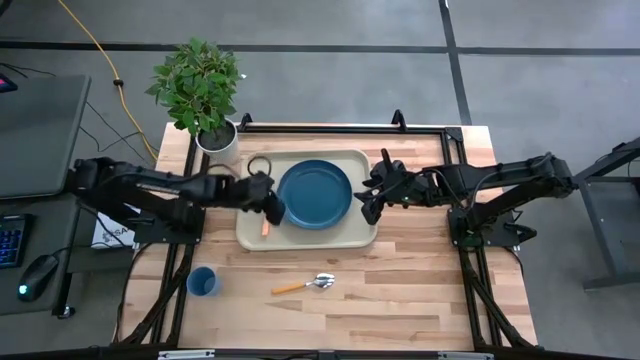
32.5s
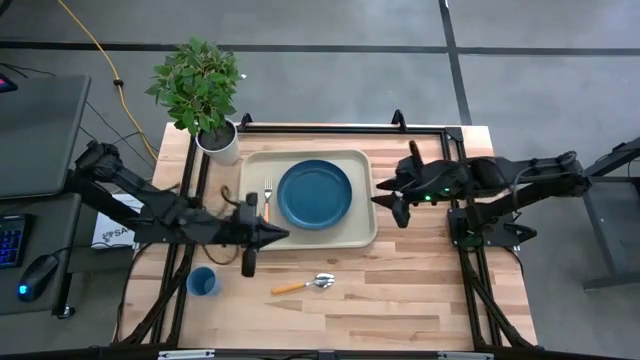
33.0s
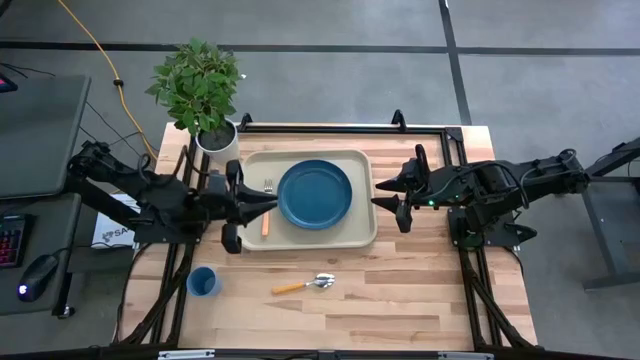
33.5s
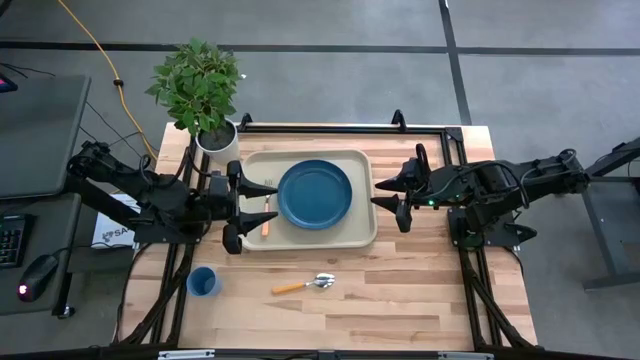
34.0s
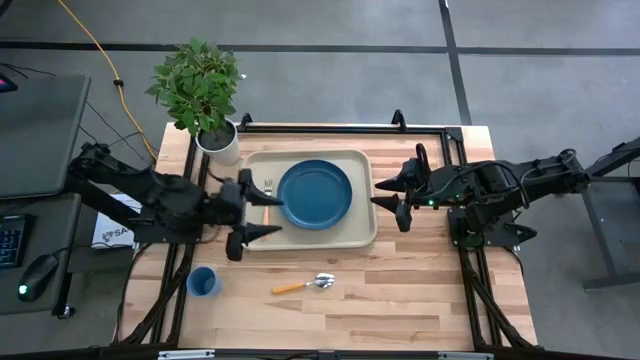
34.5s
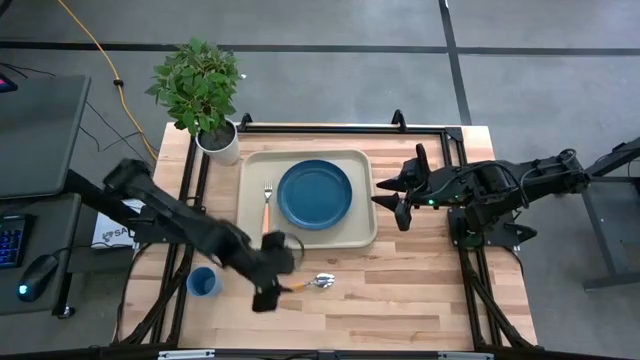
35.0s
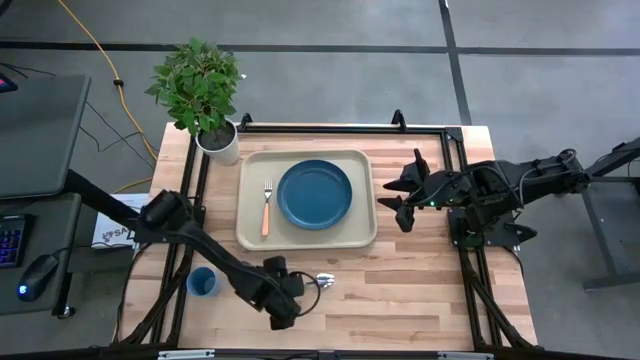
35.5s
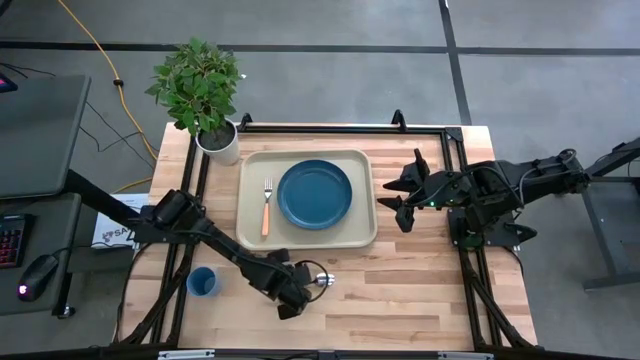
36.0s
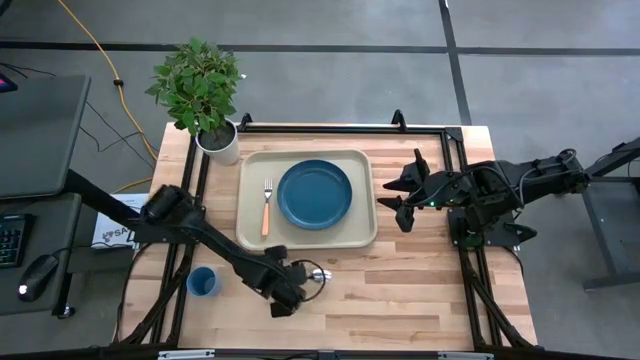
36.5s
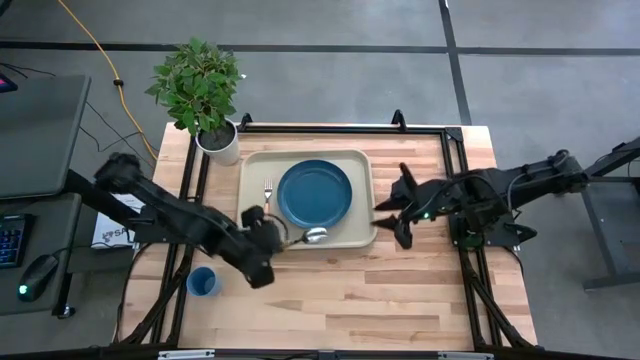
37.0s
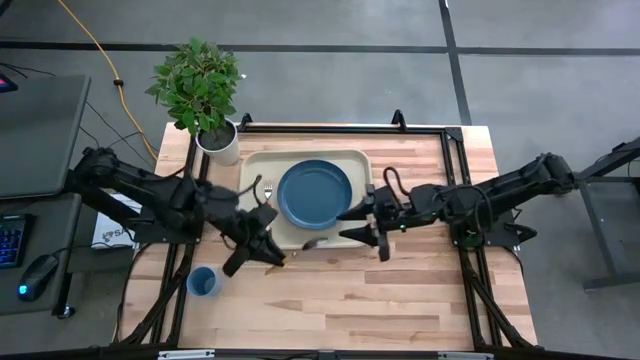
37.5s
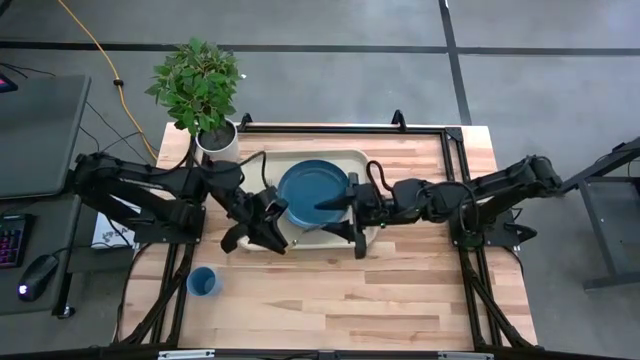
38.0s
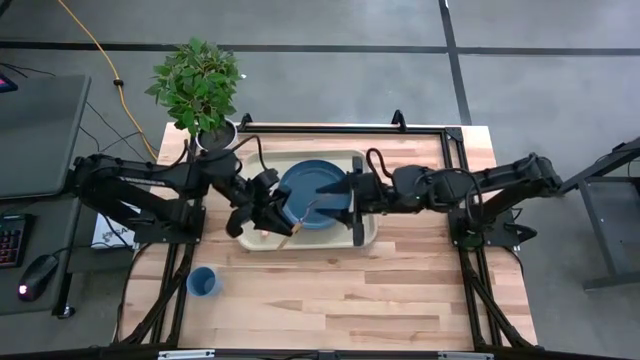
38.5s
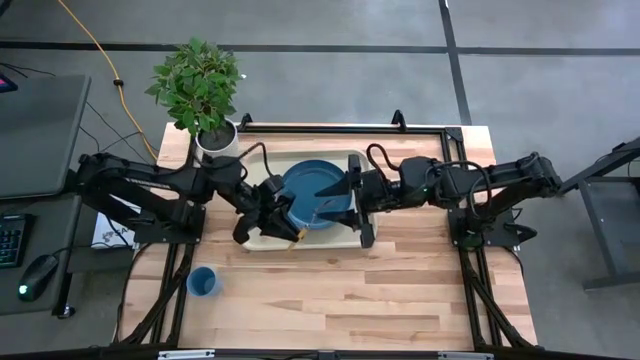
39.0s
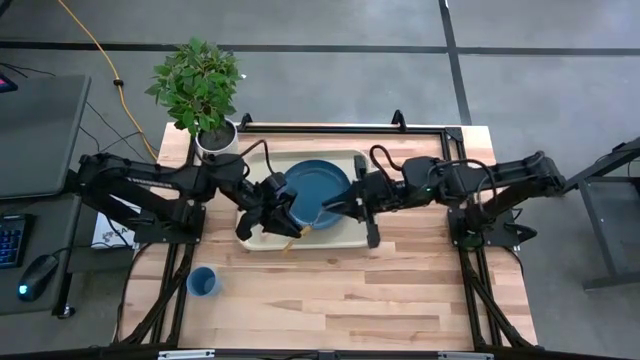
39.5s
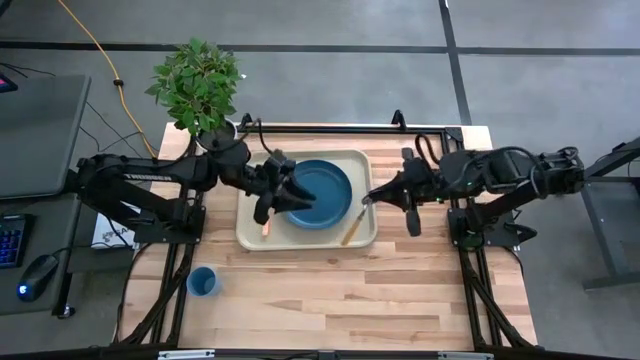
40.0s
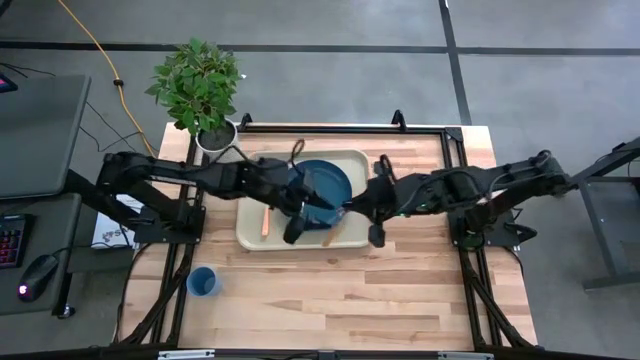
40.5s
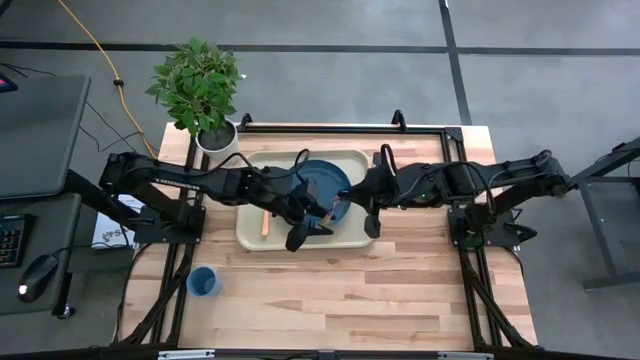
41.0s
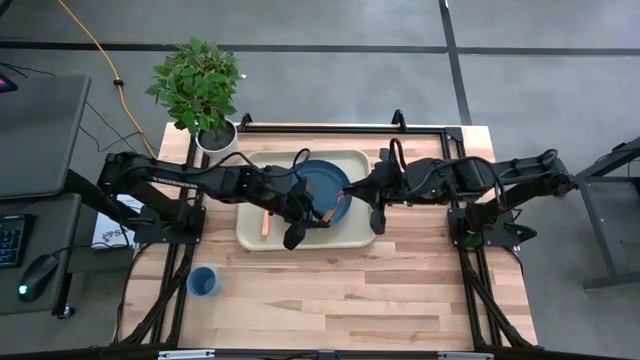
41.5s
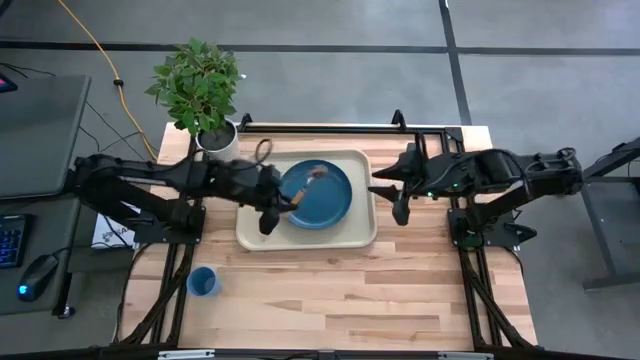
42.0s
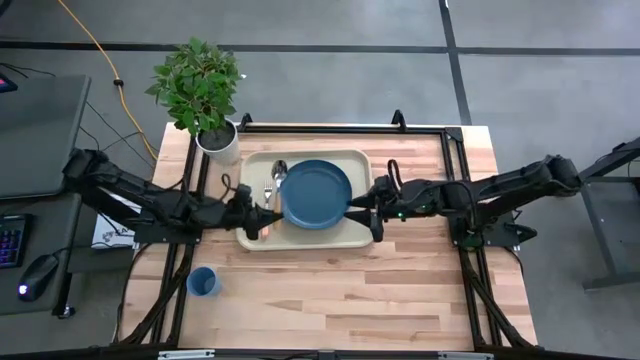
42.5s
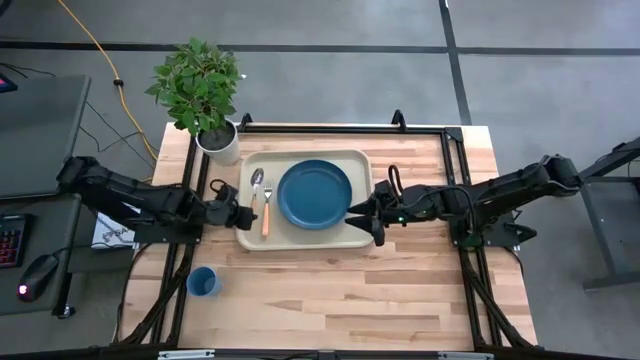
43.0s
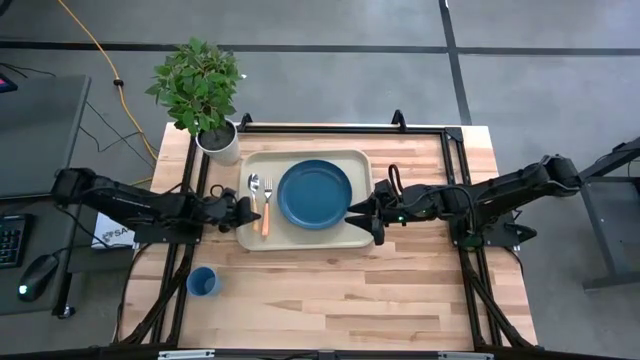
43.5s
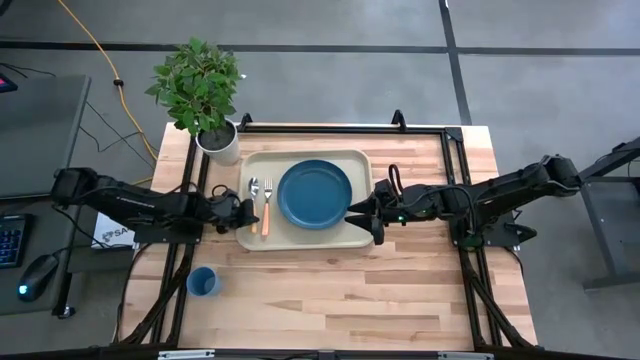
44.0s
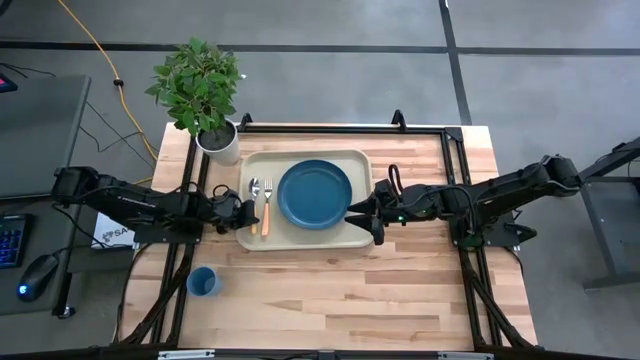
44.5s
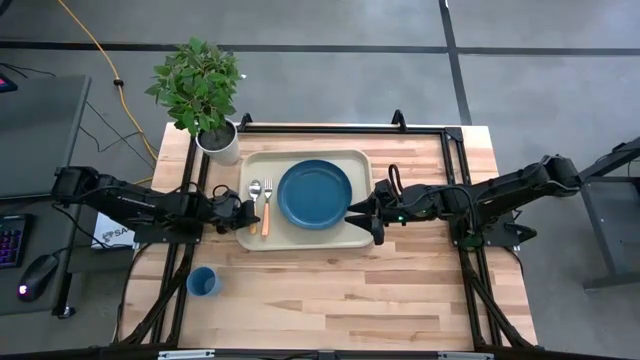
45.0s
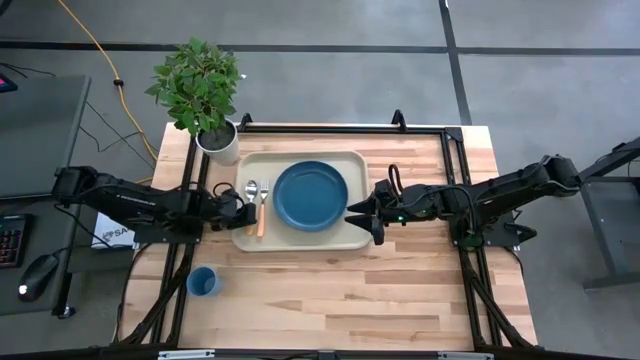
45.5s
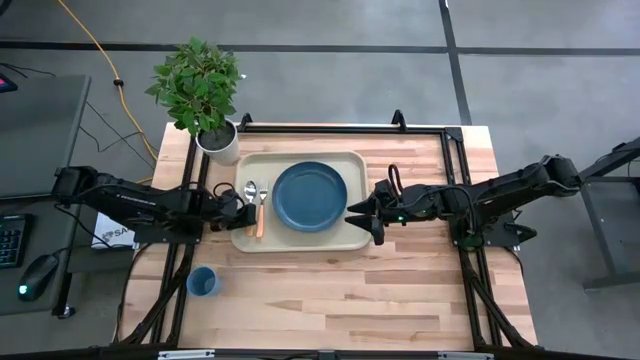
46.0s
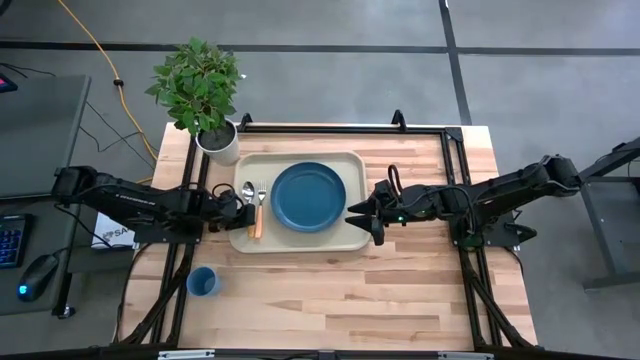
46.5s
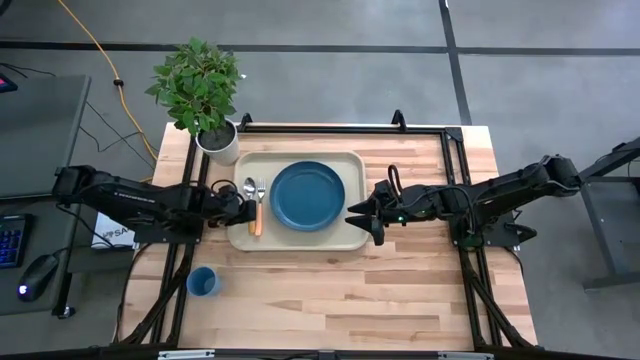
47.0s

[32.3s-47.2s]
Task: Pick and place plate/cup/fork/spoon on tray
Put the spoon on the left side of the fork on the serving tray

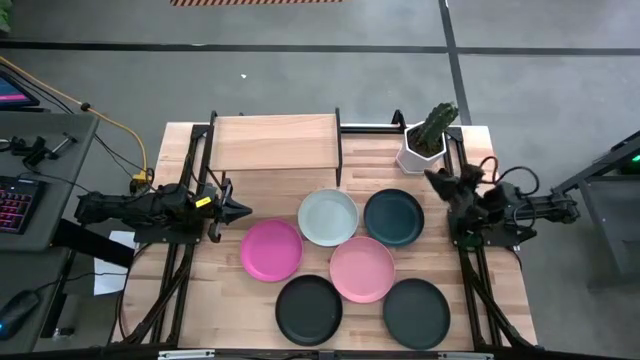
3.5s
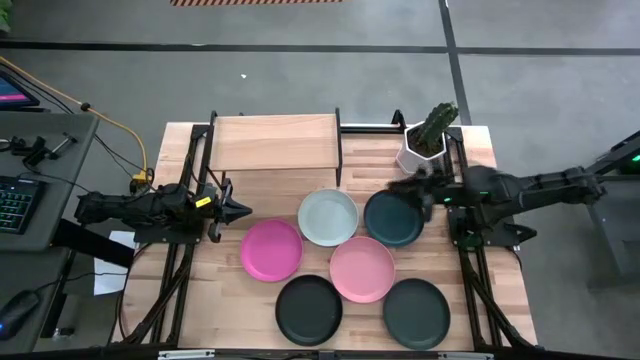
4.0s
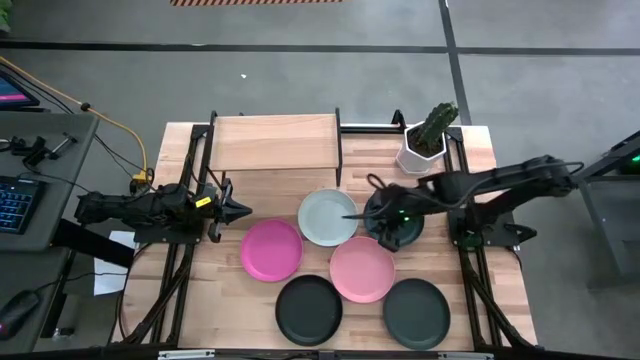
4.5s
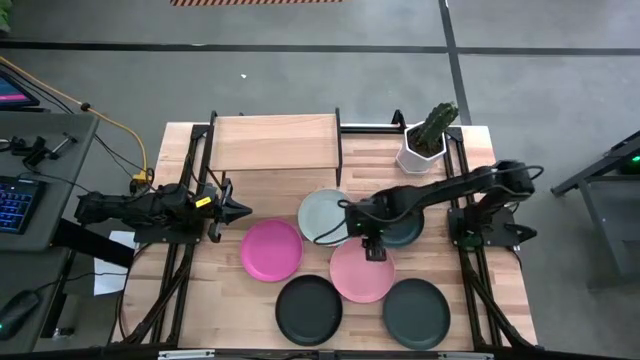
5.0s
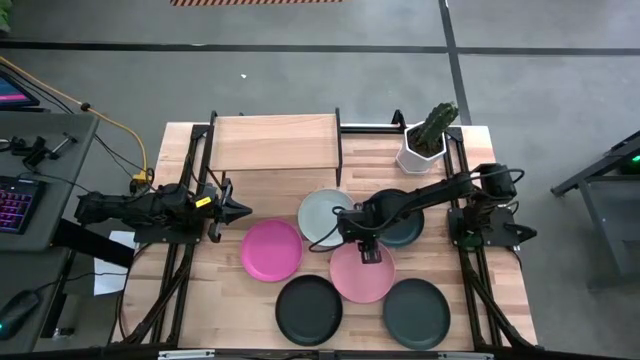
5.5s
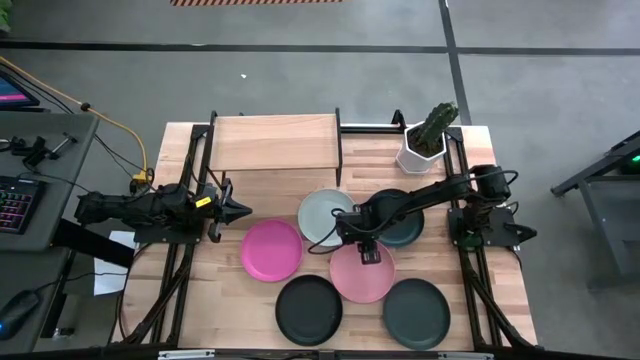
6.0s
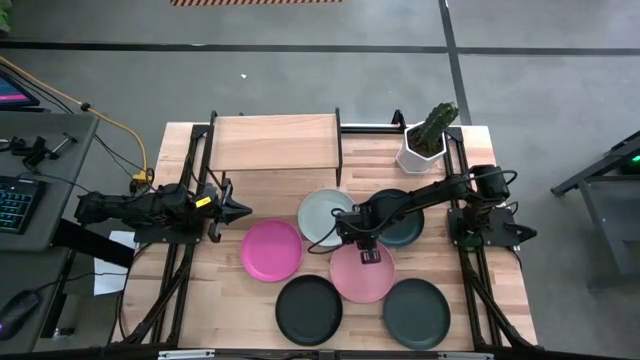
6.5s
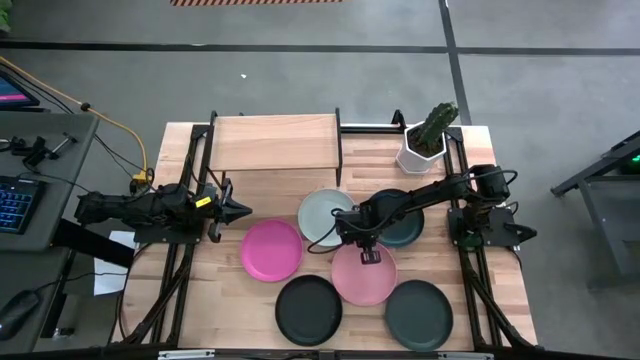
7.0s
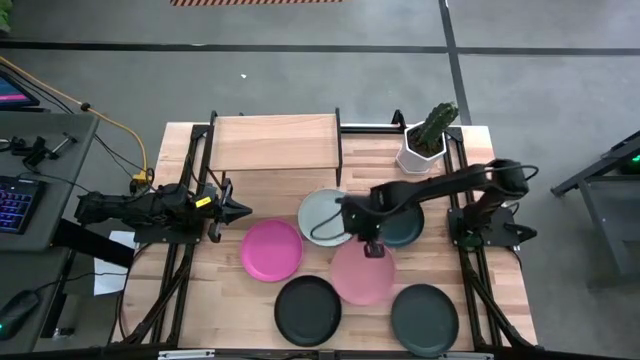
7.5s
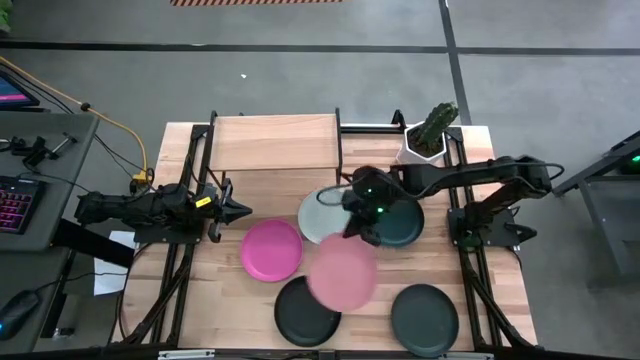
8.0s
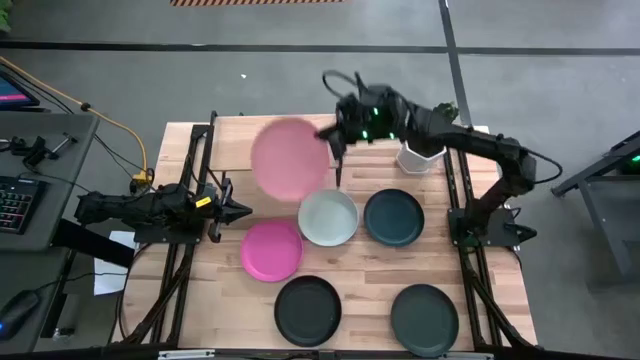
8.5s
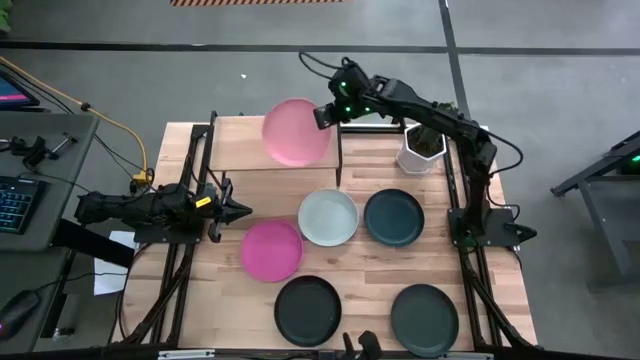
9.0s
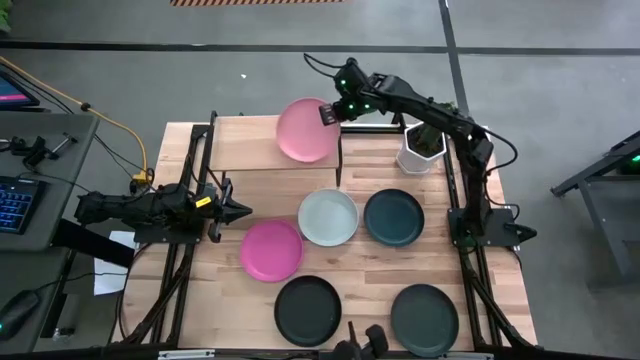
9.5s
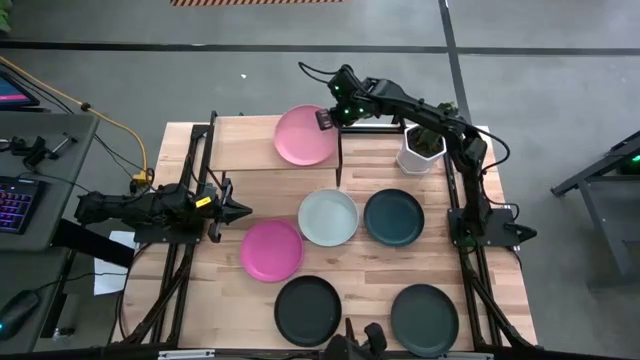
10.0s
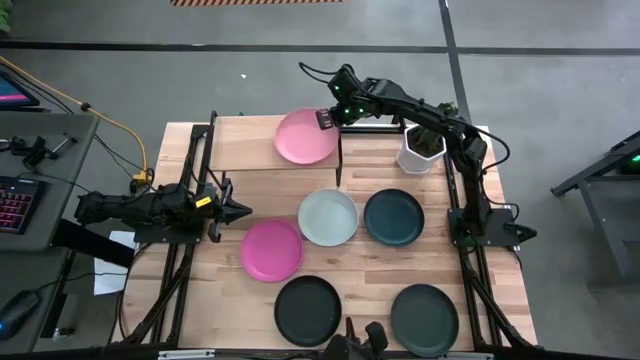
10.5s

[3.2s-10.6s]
Task: Place and stack plates onto a shelf
Put the light pink plate on the shelf
